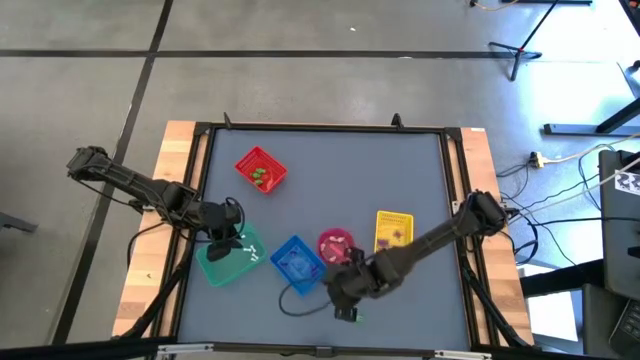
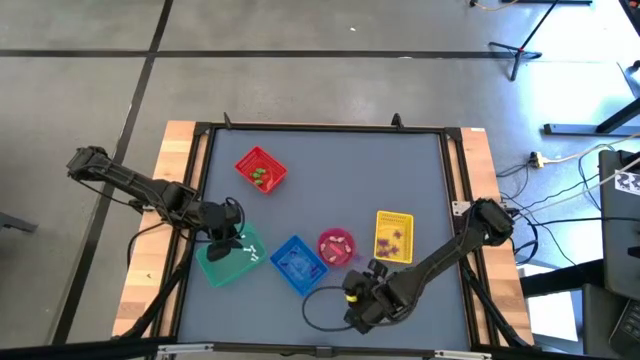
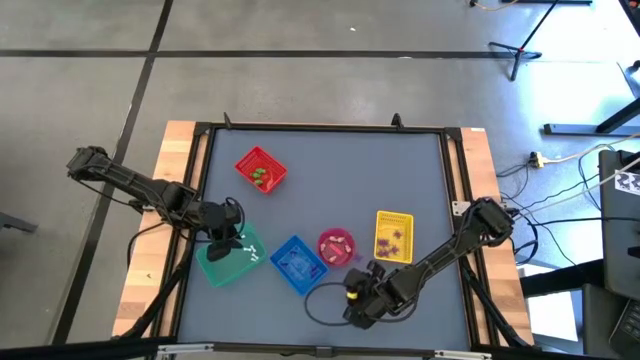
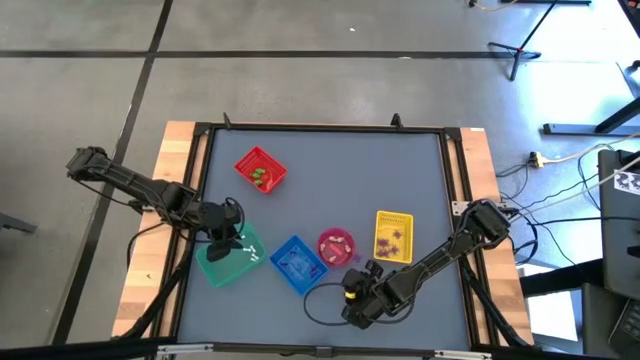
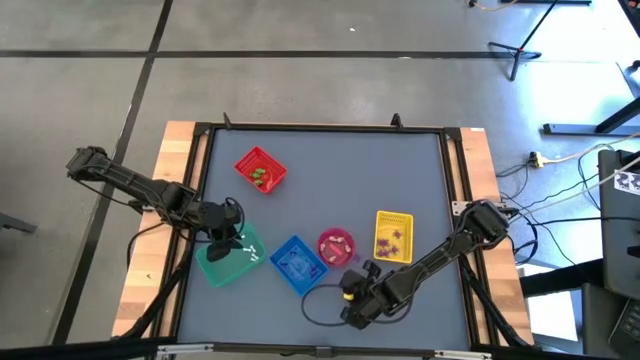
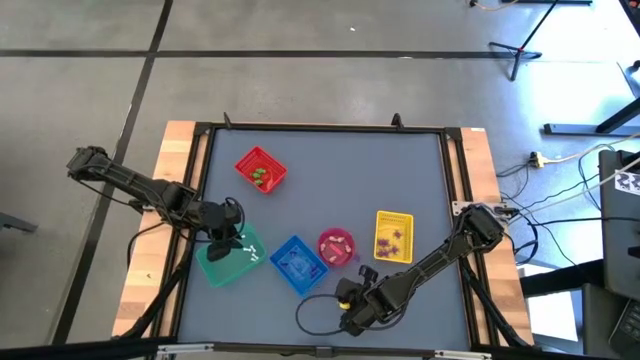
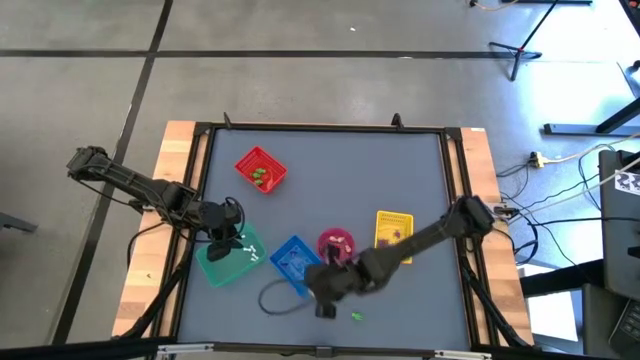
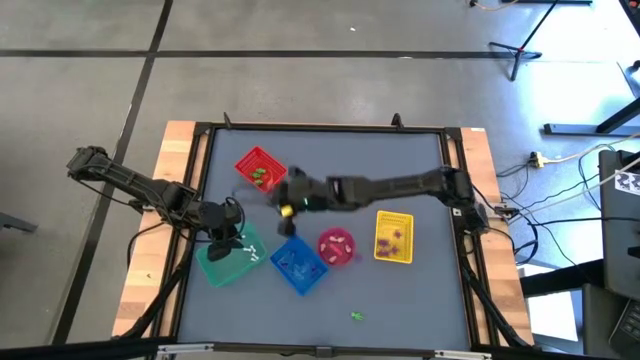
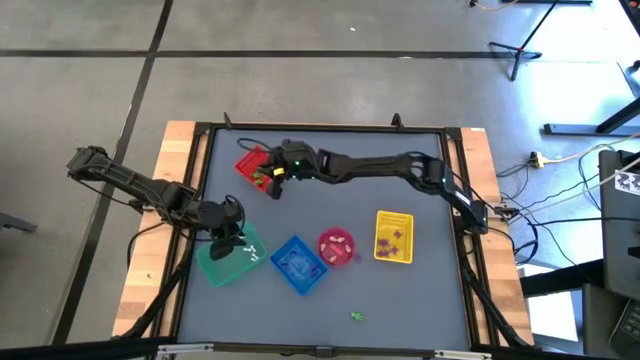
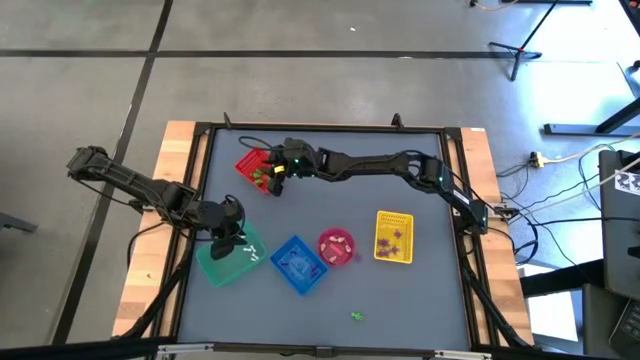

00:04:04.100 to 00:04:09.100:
Task: Sort Halloween decoration
Put the green skeleton toy into the red bin

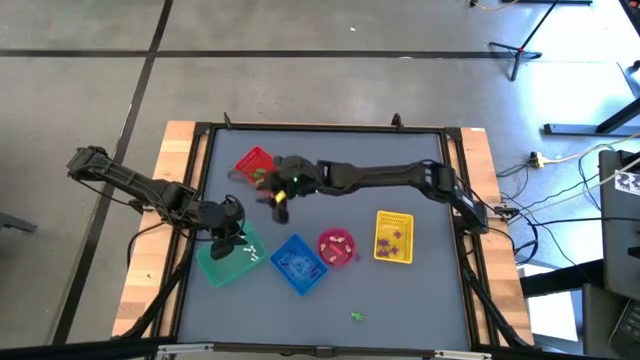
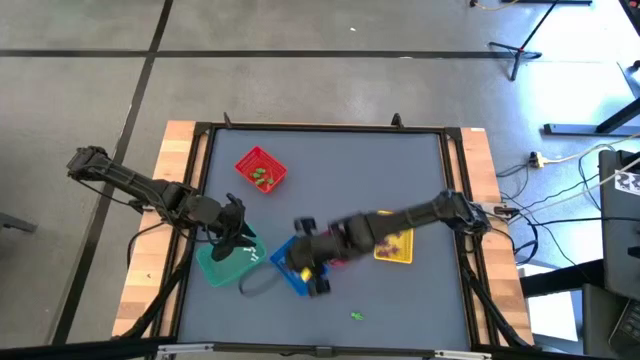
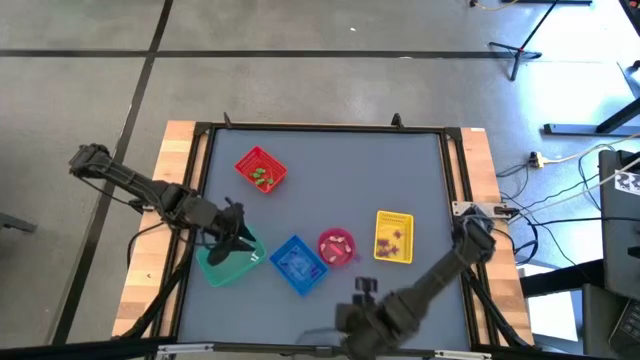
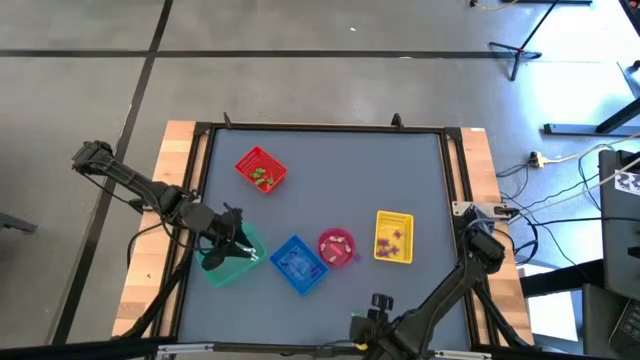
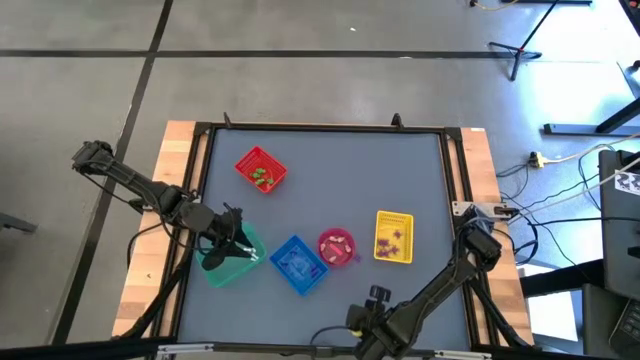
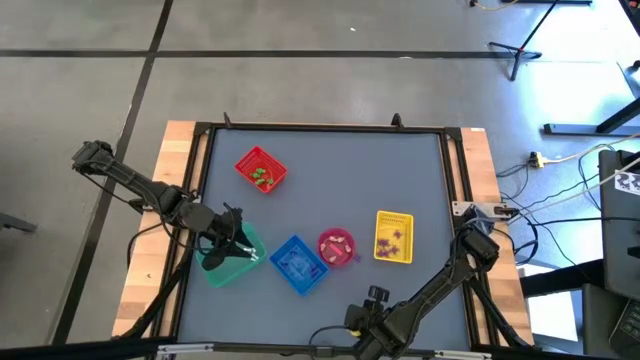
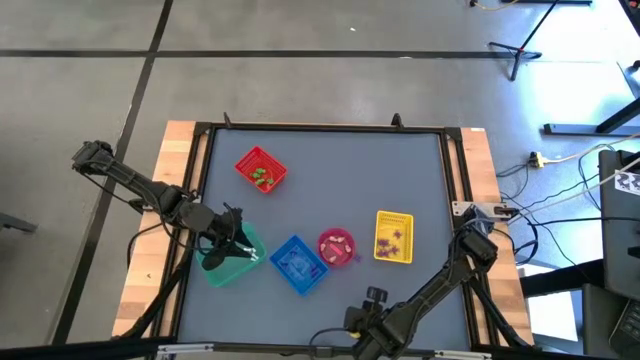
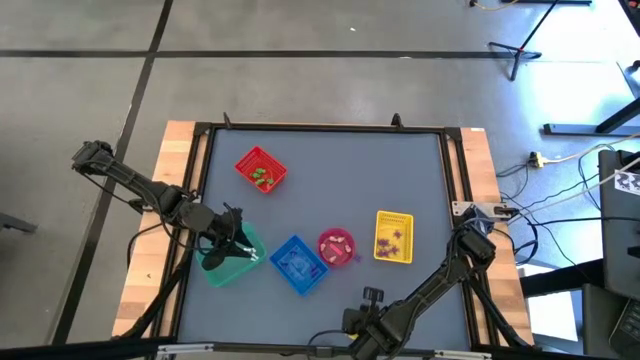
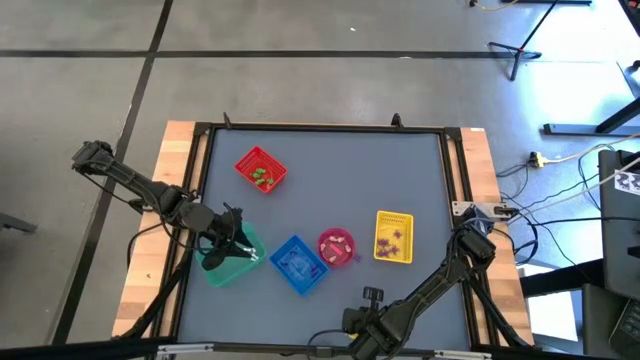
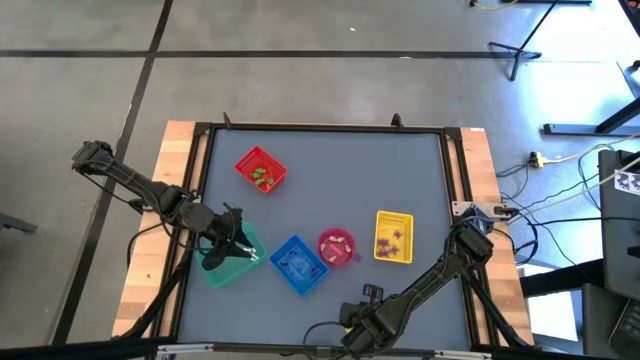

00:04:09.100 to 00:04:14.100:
Put the green skeleton toy into the red bin

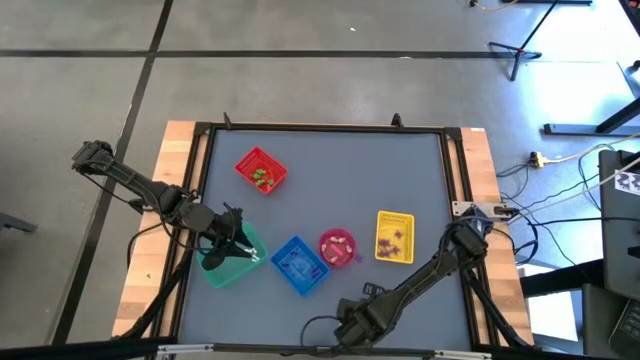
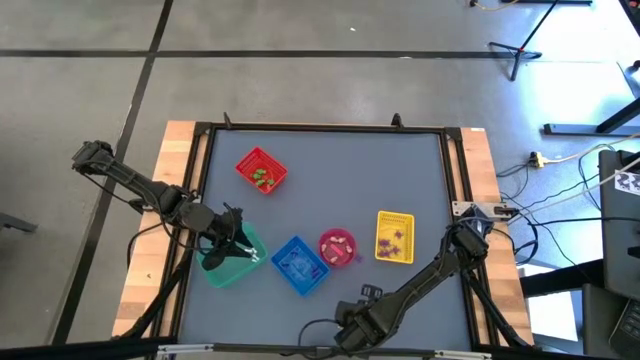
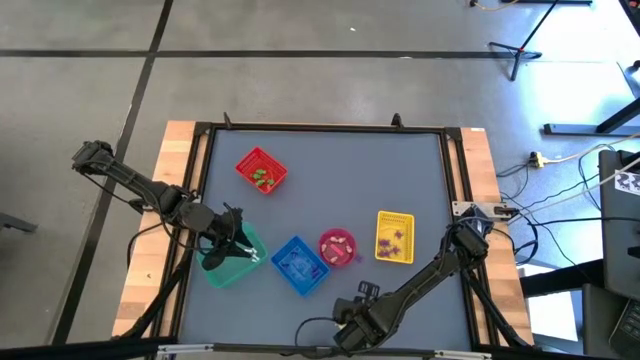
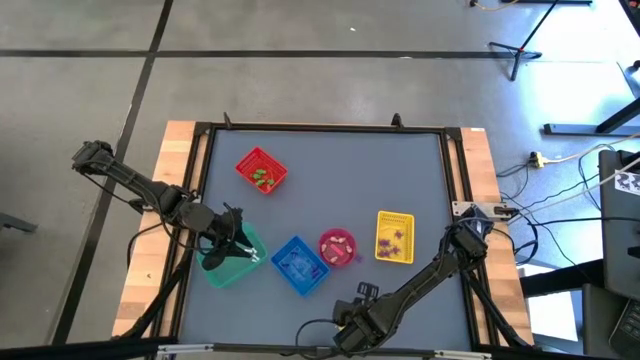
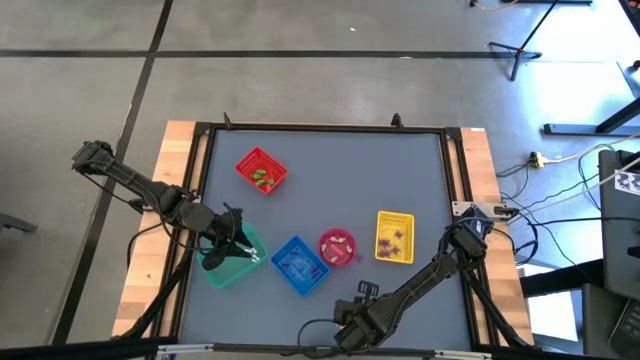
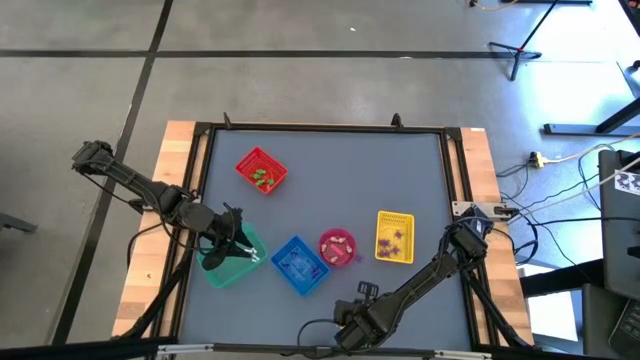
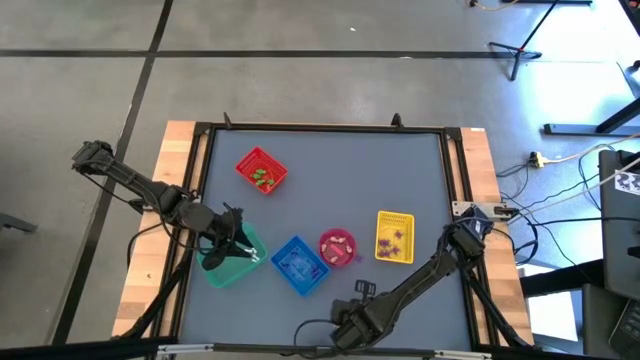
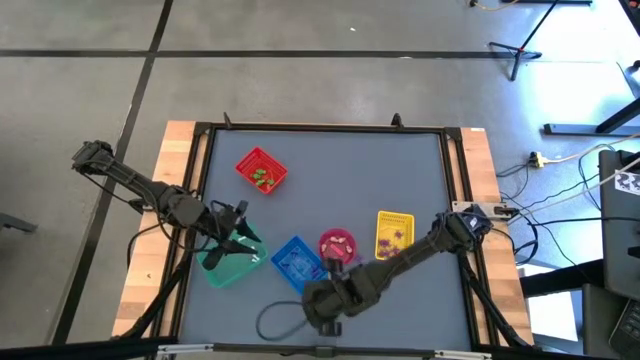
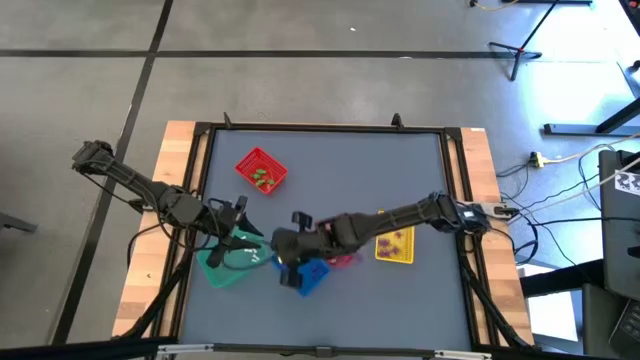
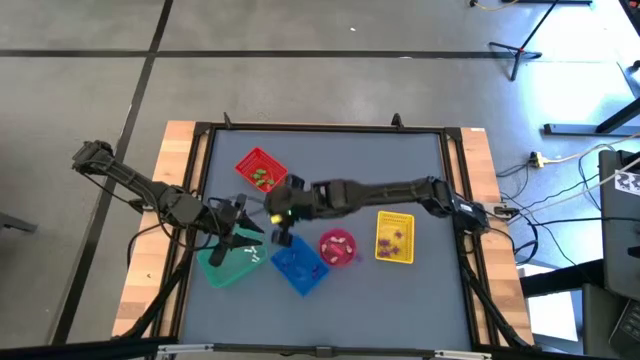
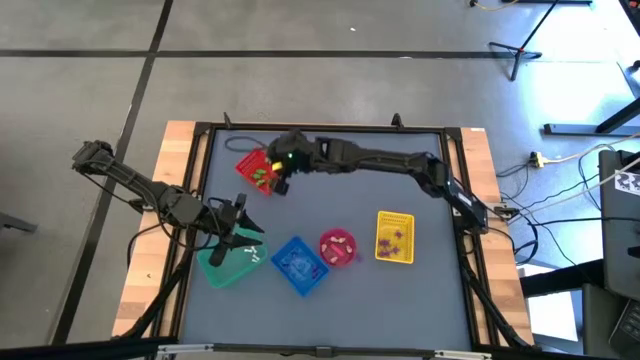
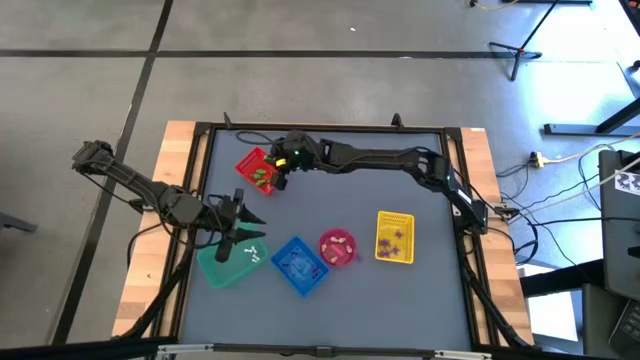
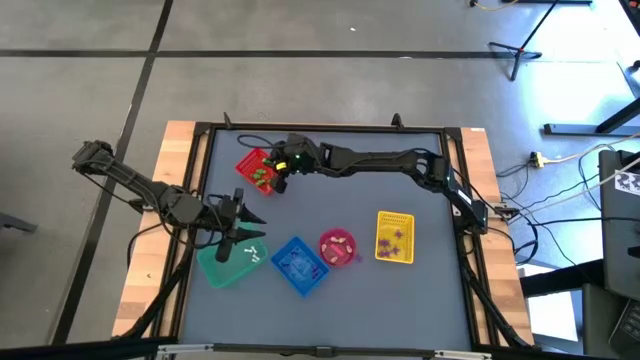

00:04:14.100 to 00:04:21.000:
Put the green skeleton toy into the red bin

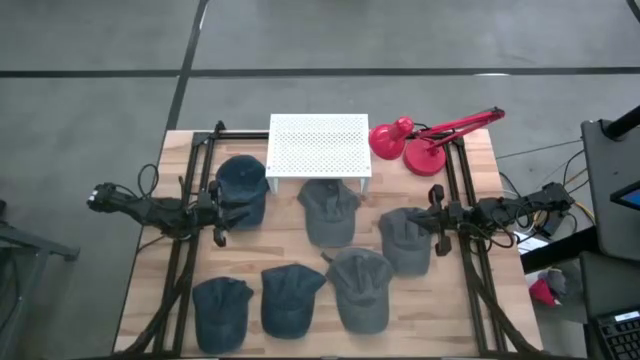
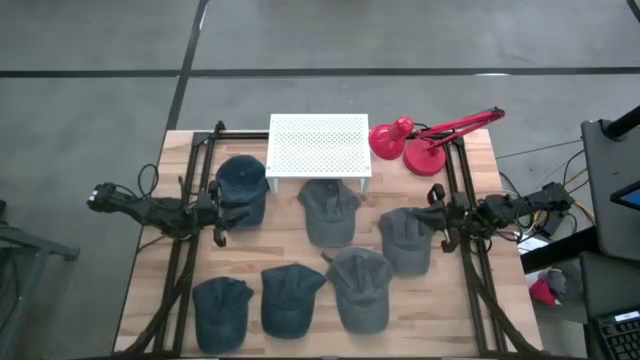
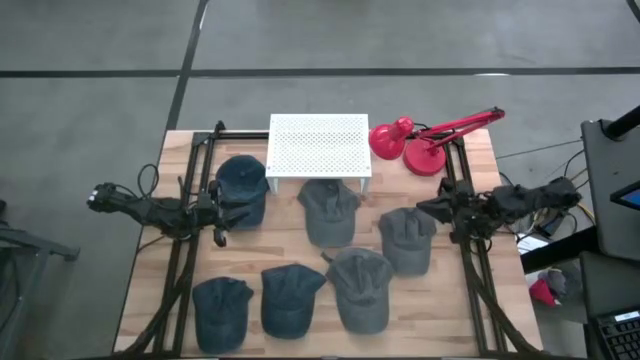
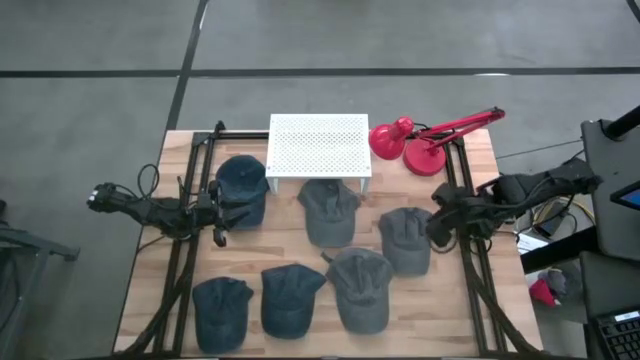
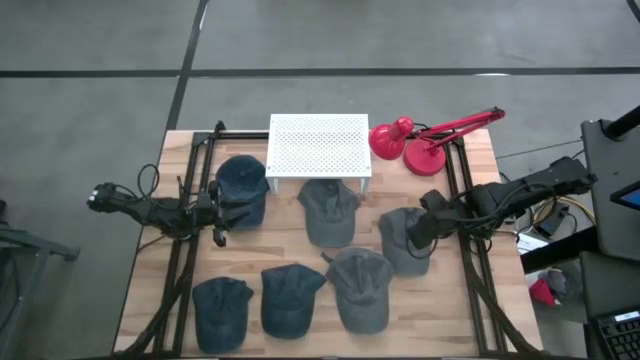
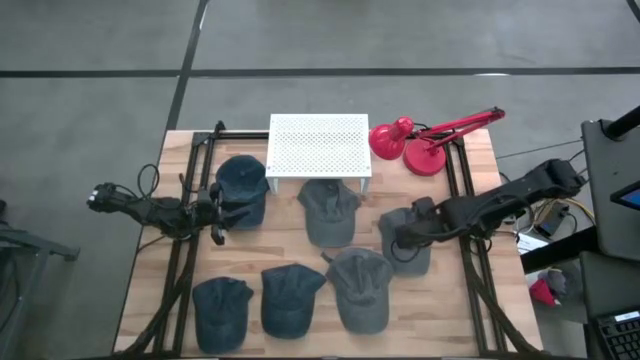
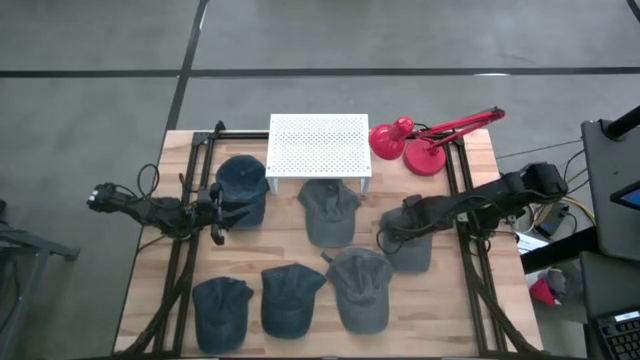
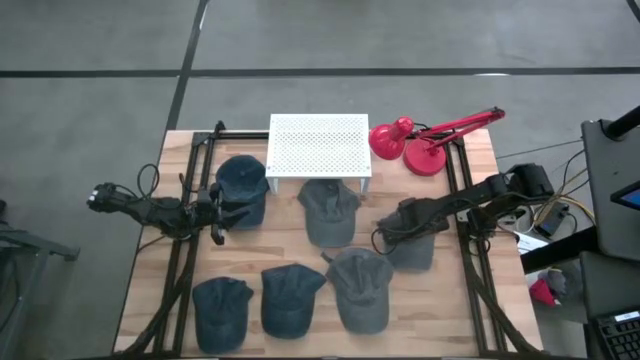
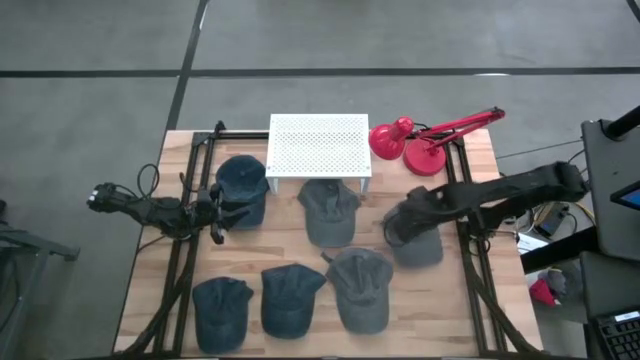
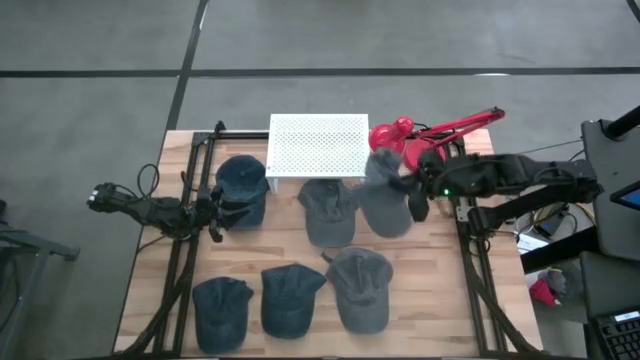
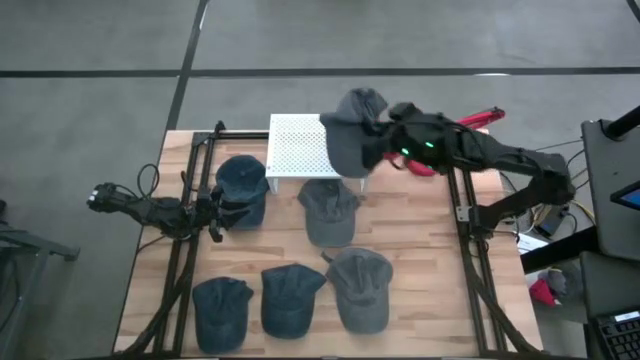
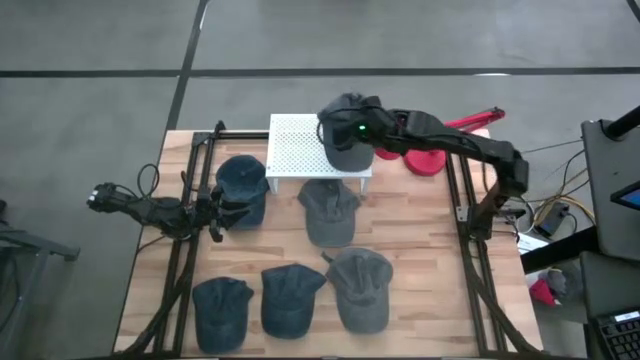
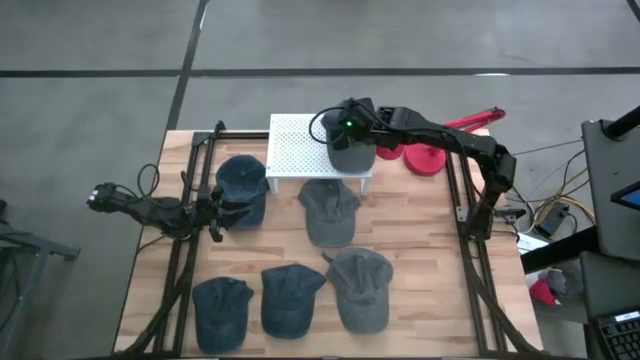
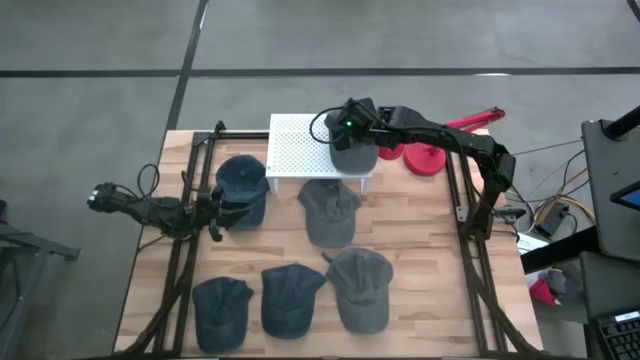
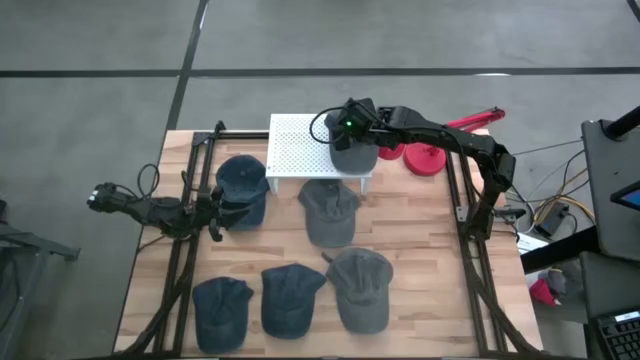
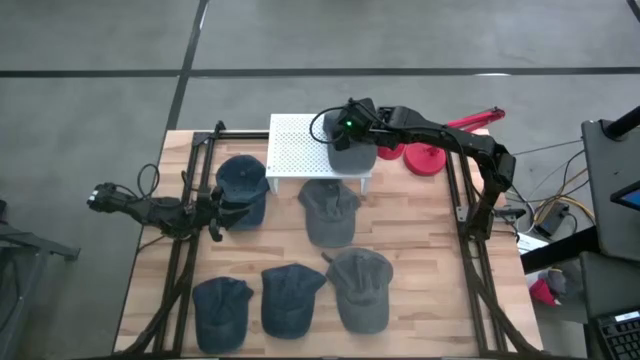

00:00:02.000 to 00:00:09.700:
Task: Pick & Place hat
Put the top right gray cap on the shelf
